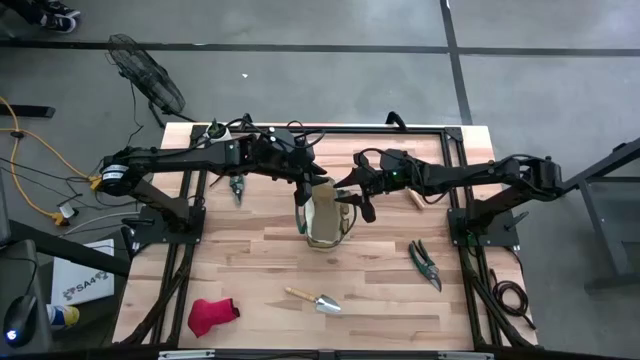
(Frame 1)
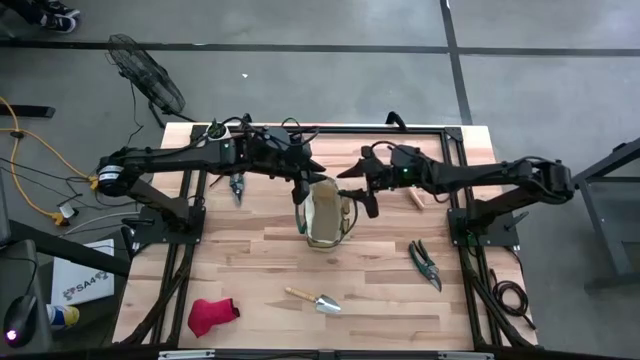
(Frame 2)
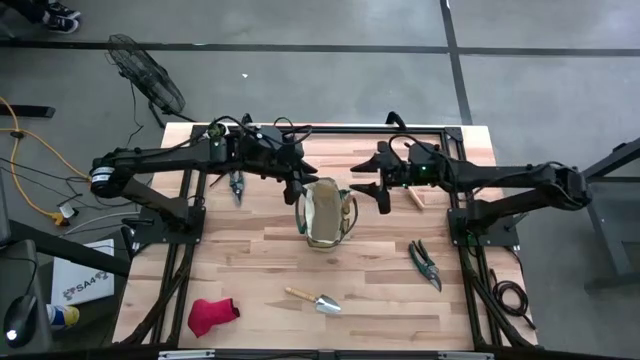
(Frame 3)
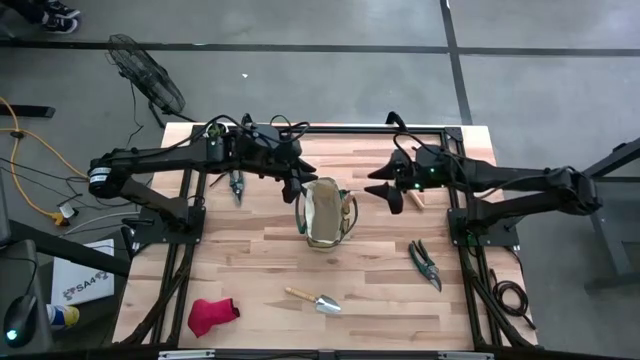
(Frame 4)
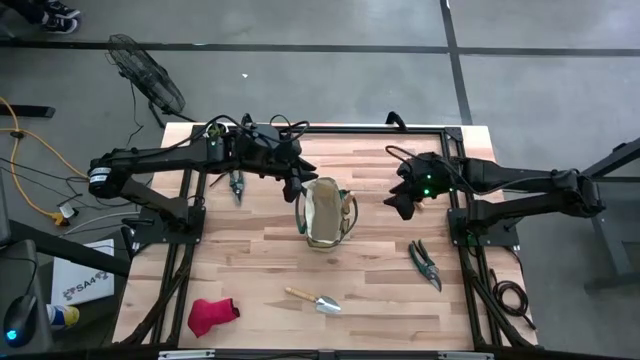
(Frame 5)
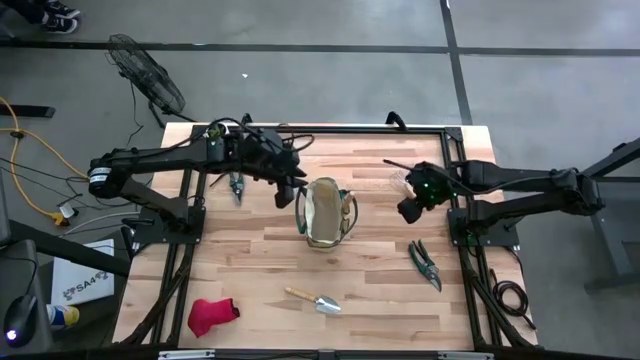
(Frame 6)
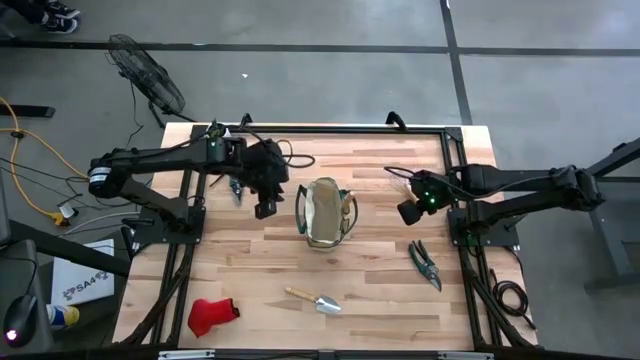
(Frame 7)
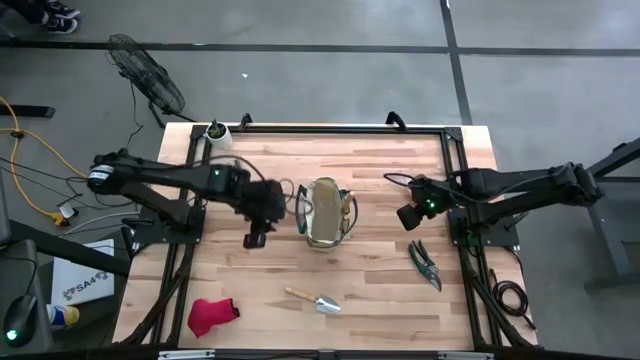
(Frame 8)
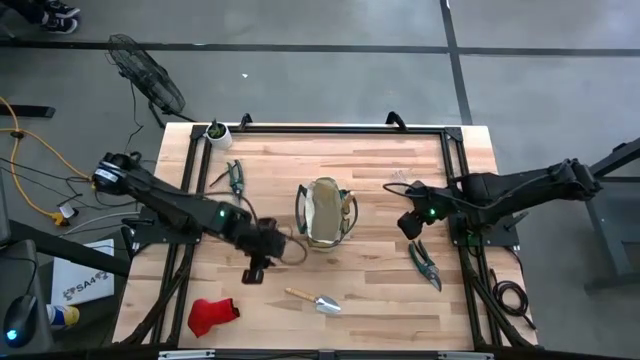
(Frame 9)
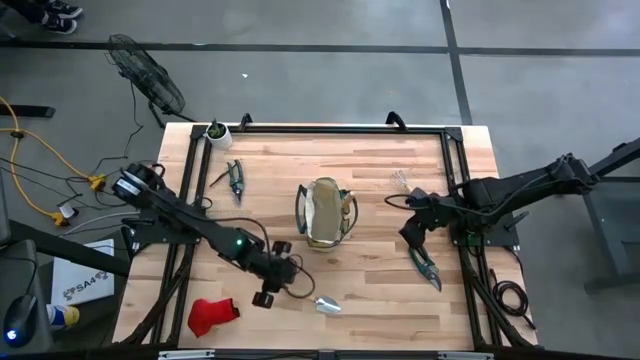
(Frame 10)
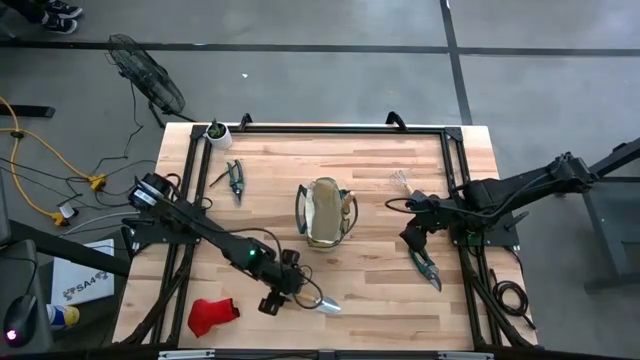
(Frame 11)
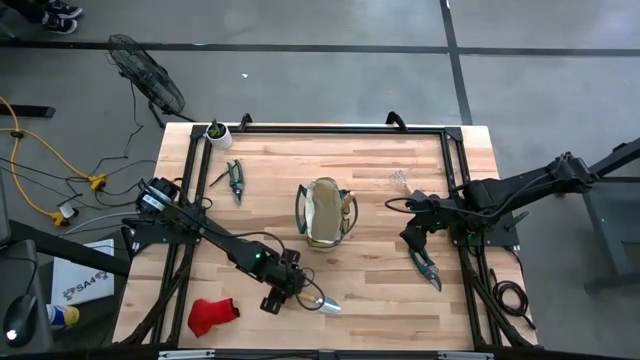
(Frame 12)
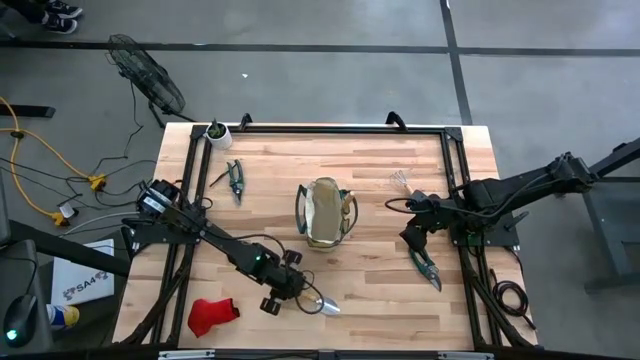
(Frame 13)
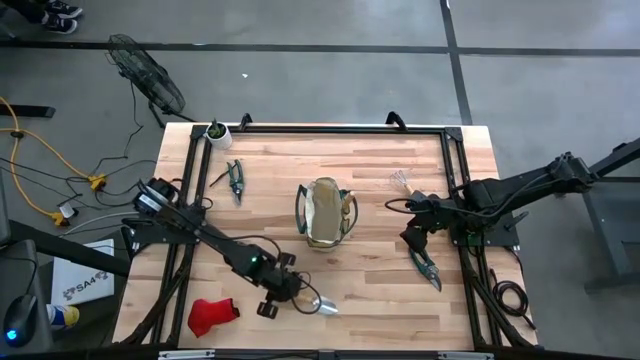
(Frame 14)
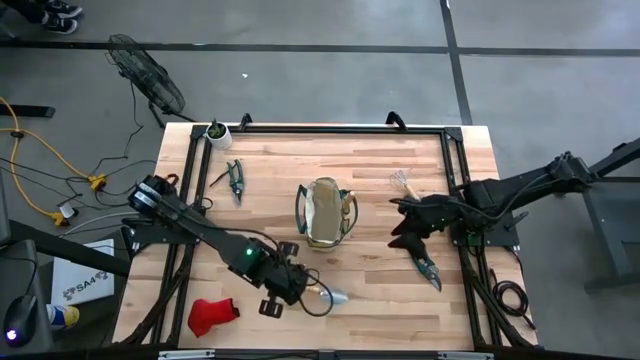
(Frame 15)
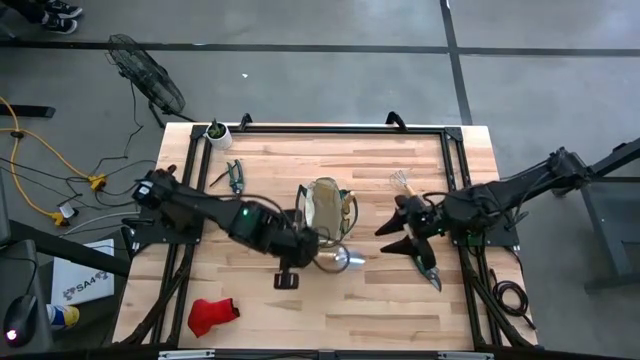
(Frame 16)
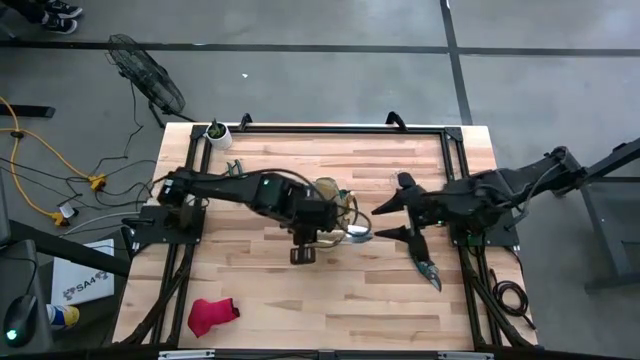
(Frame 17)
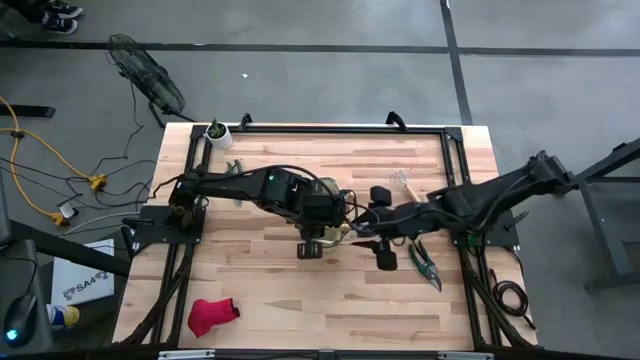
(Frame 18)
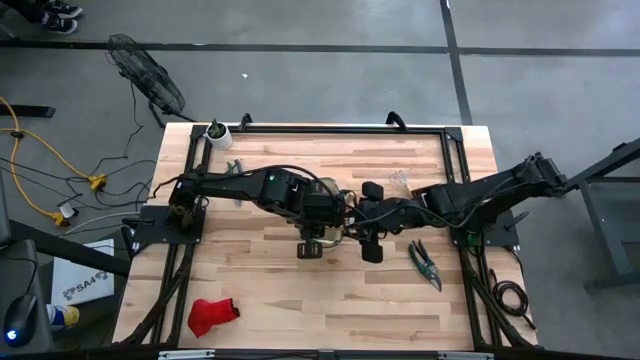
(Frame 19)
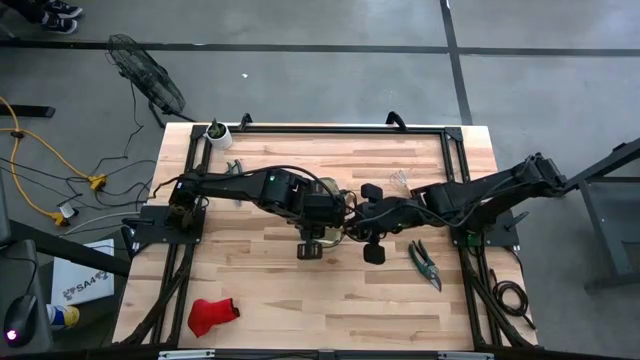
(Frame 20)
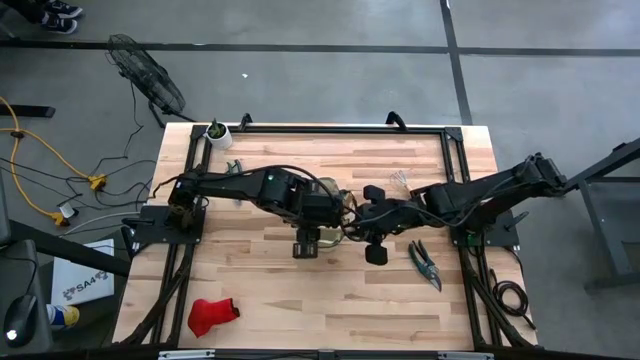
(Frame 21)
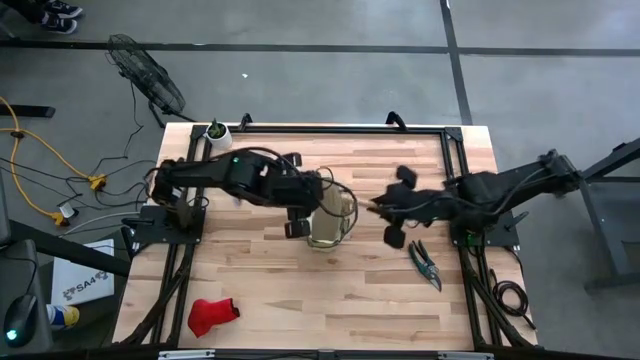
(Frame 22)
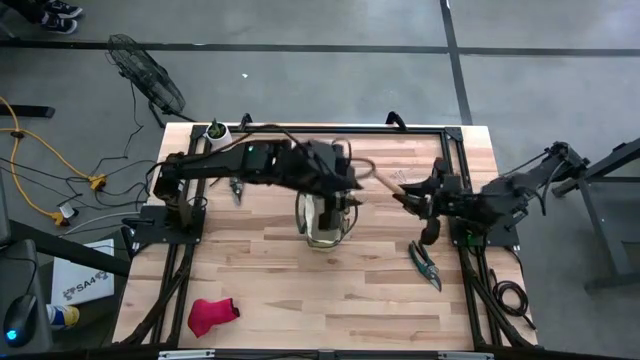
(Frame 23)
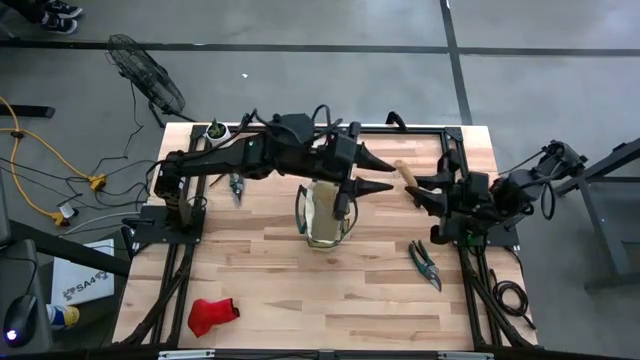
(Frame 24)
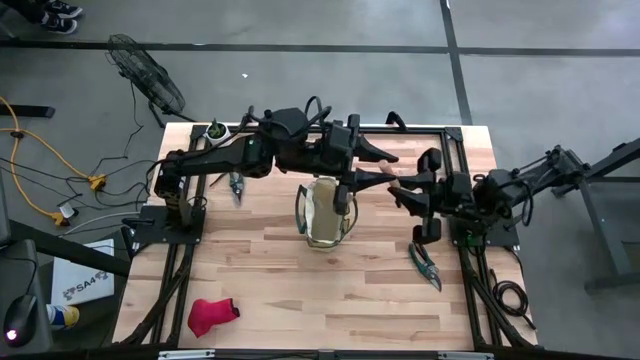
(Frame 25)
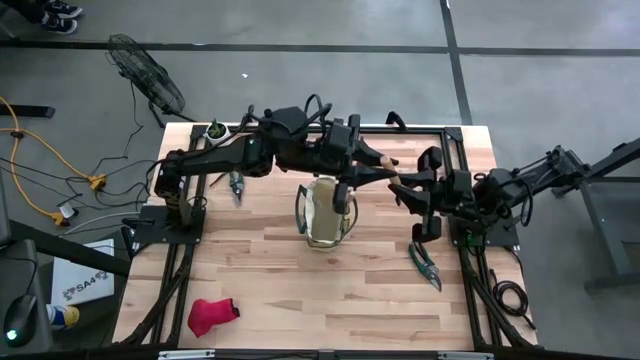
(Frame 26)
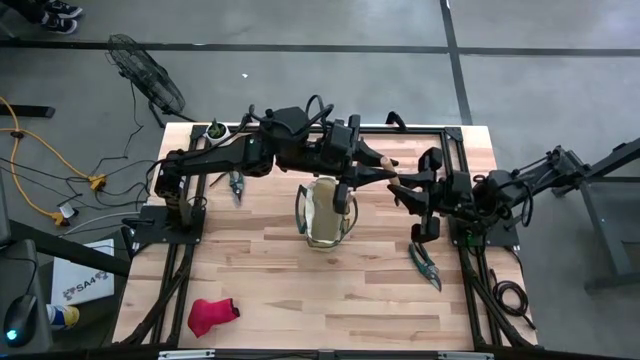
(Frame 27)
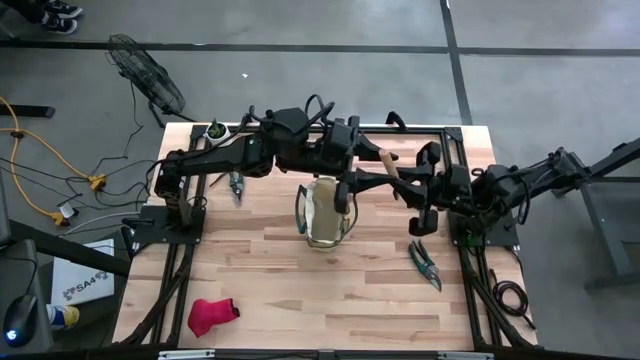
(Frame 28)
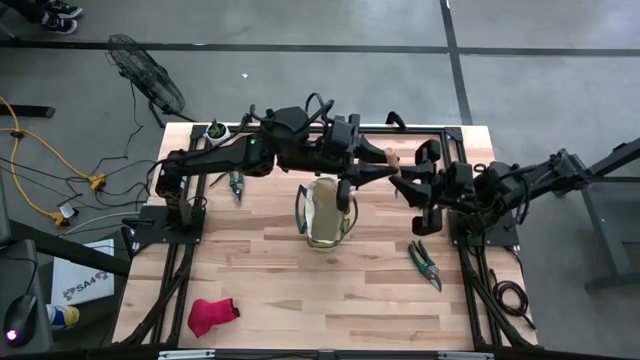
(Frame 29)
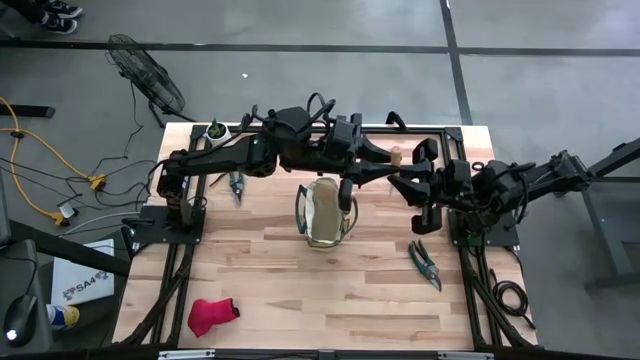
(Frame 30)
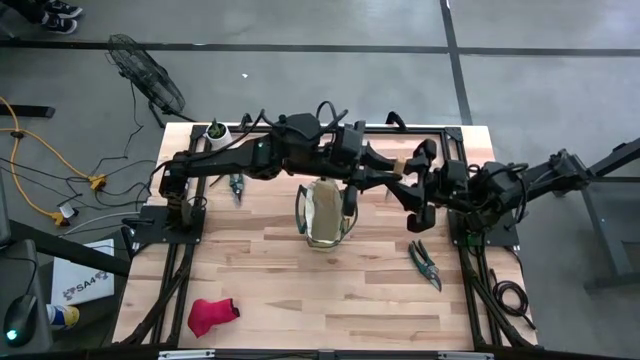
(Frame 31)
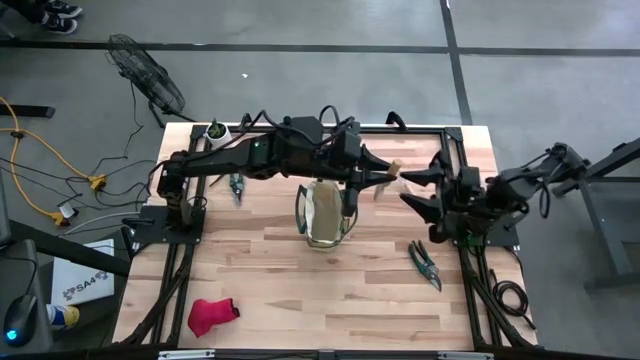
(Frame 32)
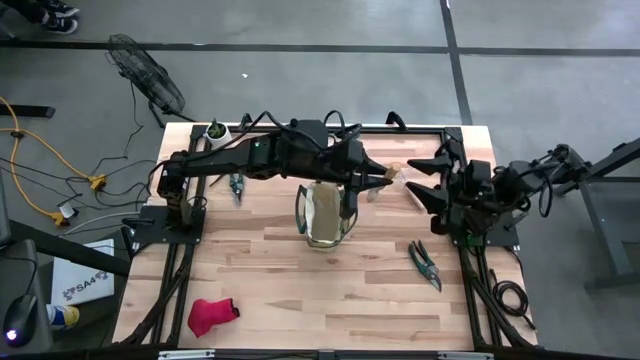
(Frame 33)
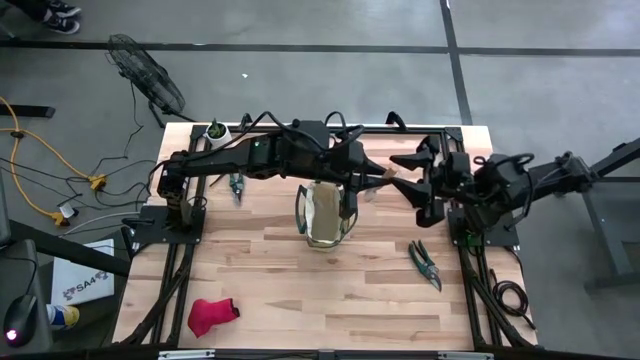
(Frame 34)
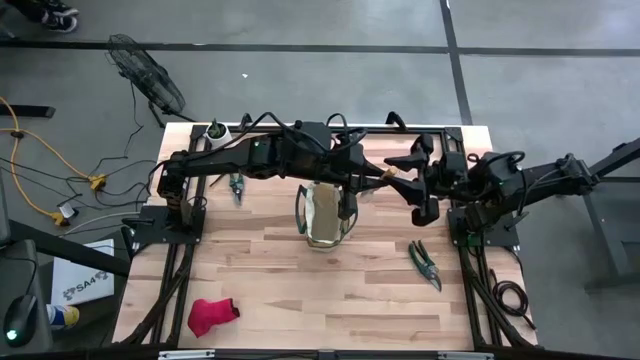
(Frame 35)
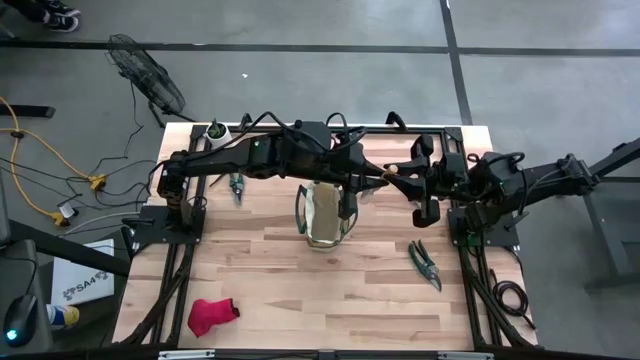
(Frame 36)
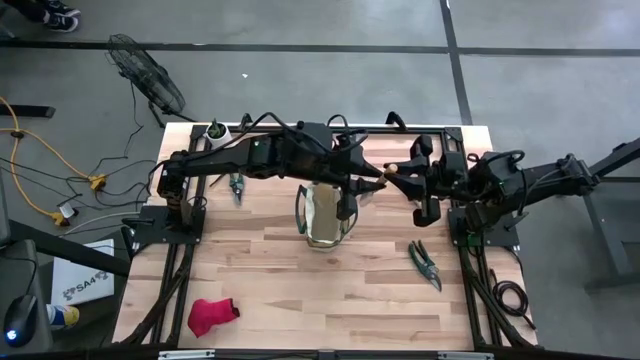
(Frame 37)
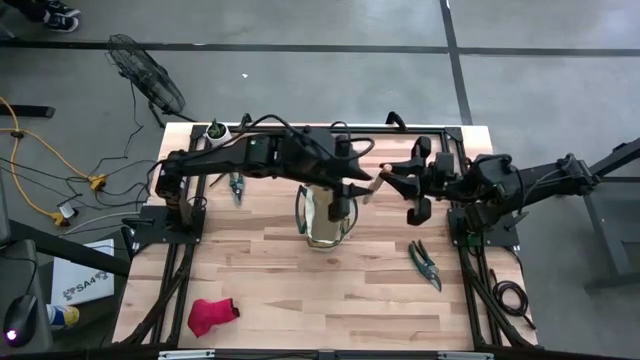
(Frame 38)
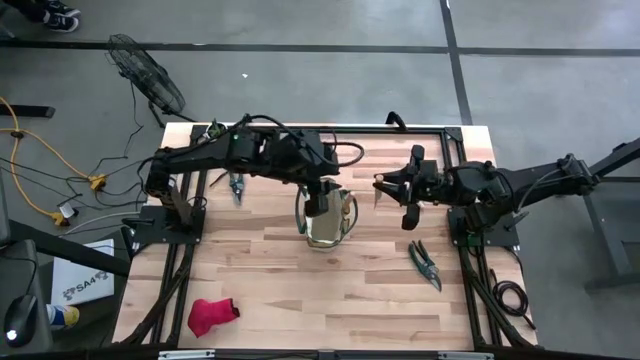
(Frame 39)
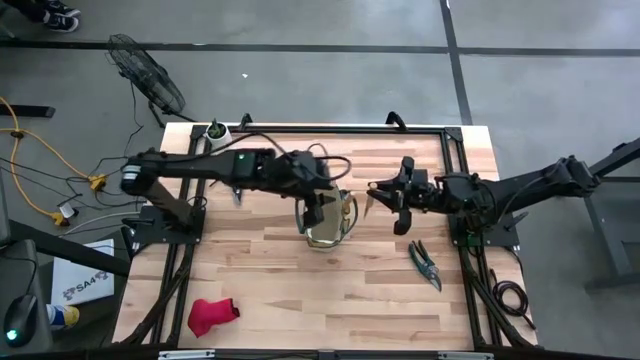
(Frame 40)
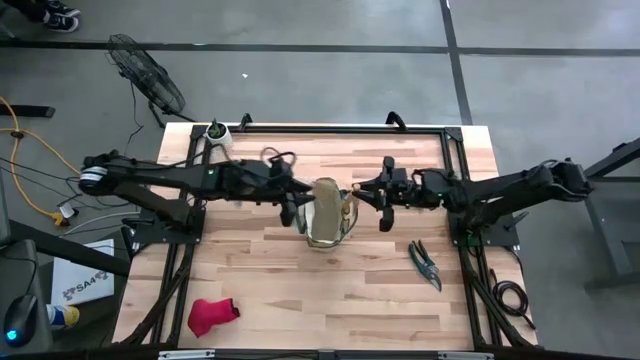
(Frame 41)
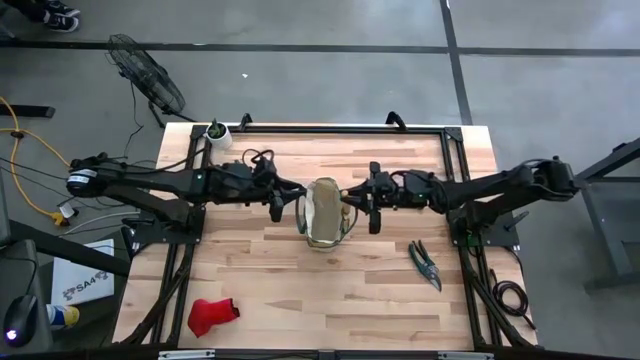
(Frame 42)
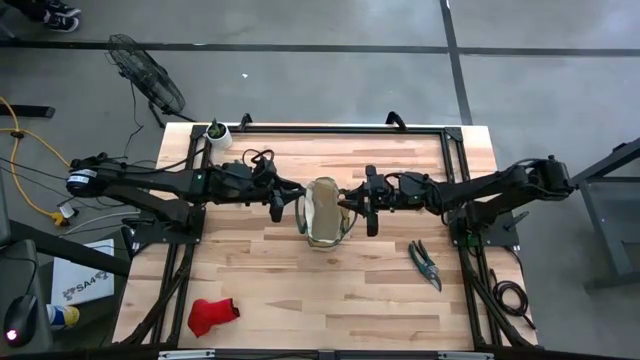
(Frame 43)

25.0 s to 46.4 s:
Task: Pick & Place Garden tools in Gardening bag
Put the trowel into the gardening bag
